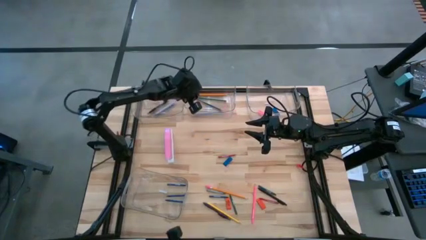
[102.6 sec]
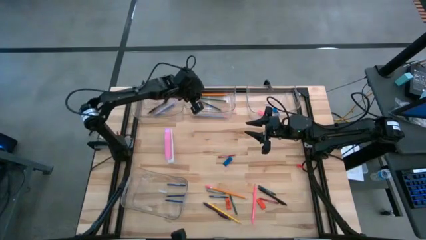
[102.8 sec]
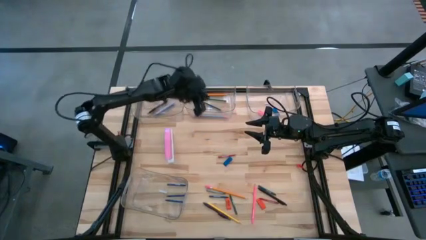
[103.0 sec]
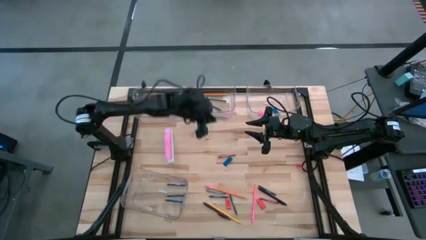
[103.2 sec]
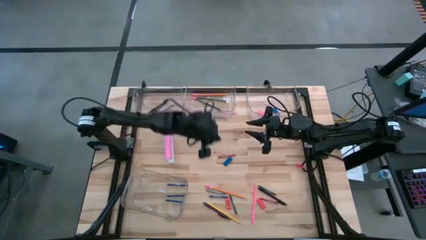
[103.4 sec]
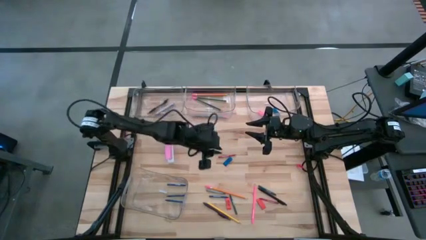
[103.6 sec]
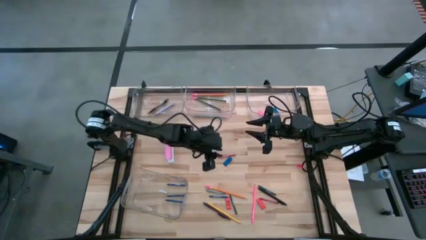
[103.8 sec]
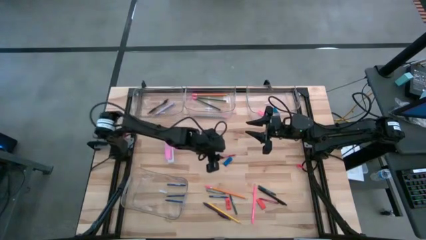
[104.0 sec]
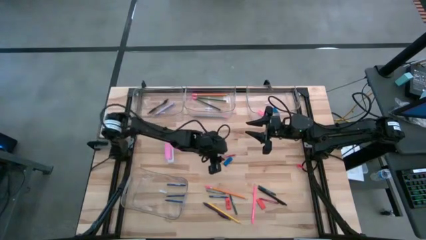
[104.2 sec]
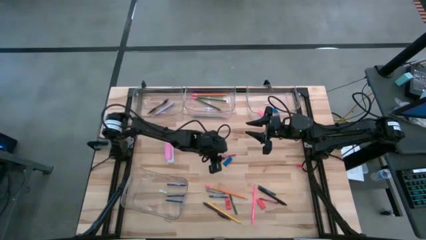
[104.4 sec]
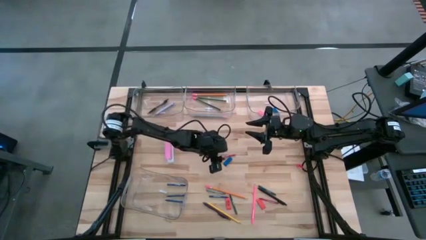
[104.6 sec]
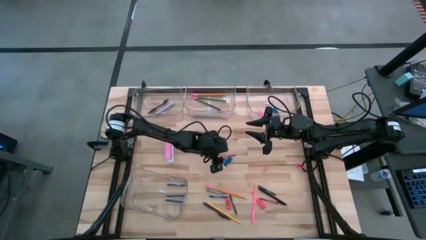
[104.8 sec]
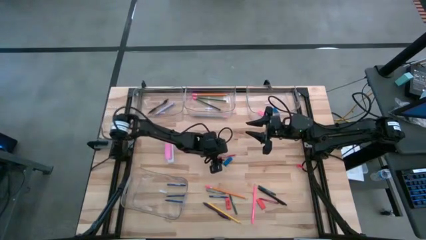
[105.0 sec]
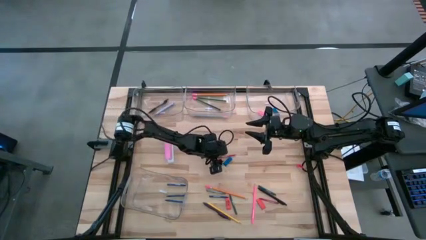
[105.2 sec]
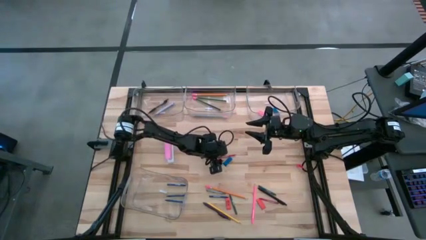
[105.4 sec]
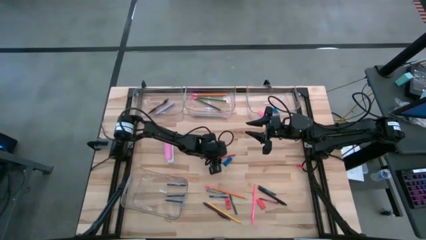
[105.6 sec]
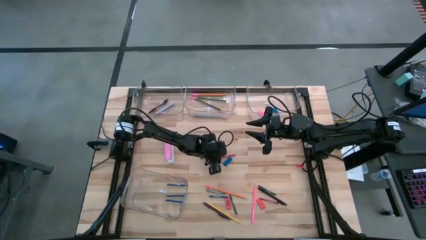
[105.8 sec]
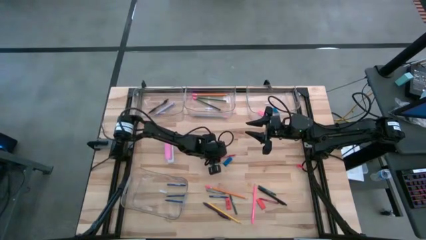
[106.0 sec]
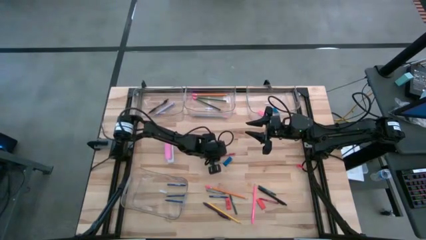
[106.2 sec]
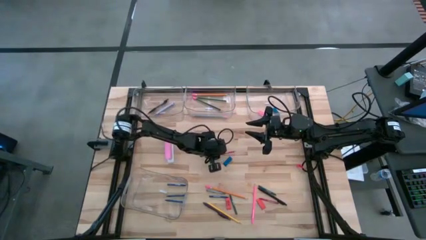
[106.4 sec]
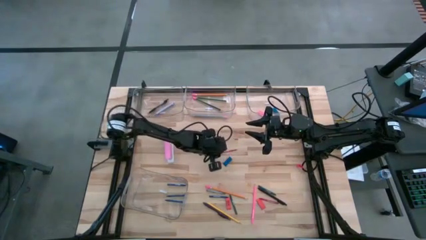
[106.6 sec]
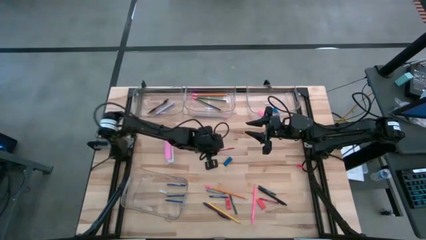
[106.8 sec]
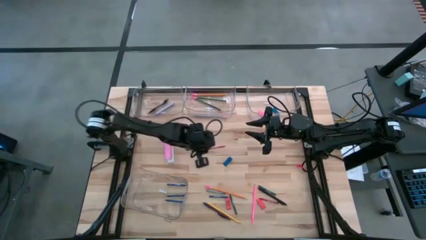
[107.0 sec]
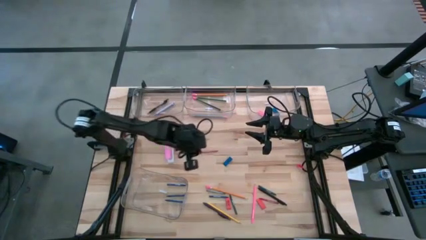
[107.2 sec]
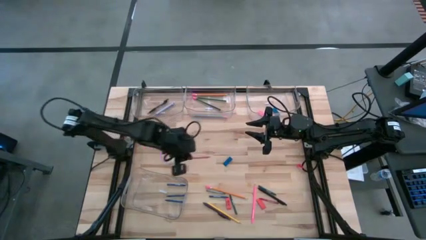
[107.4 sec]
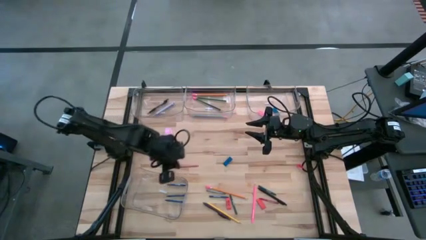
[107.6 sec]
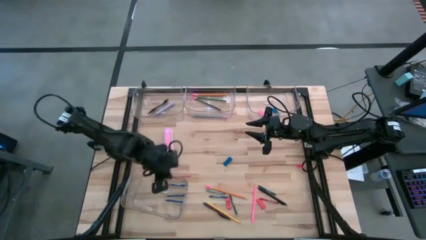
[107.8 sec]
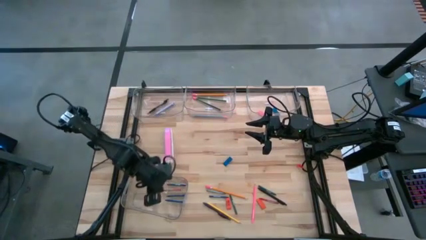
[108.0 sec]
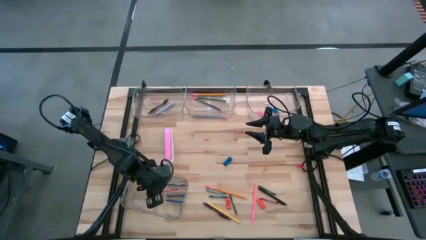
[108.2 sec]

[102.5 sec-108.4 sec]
Task: Sort crayons/erasers/pens/pencils in bins
Put the red crayon into the bottom left transparent bin

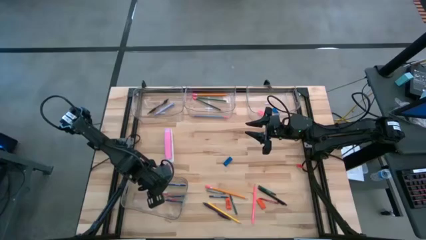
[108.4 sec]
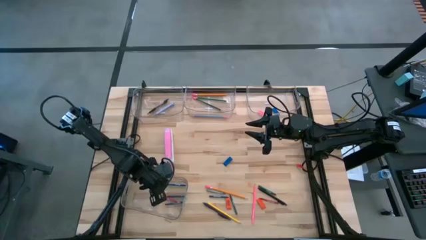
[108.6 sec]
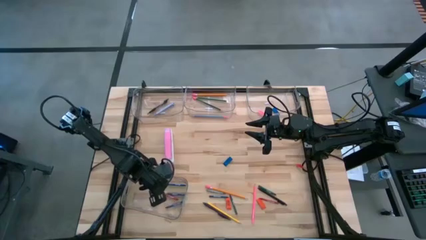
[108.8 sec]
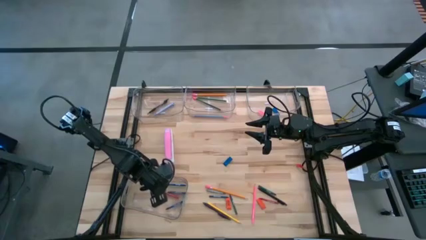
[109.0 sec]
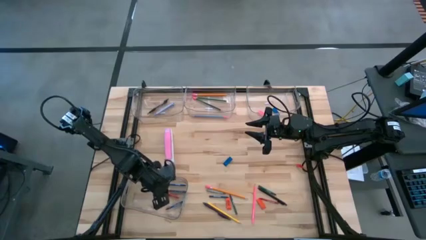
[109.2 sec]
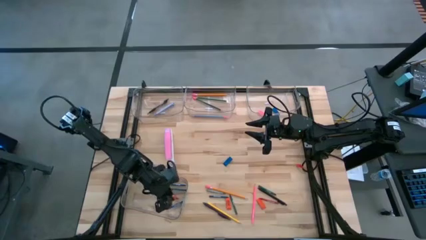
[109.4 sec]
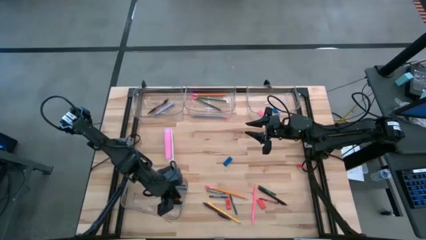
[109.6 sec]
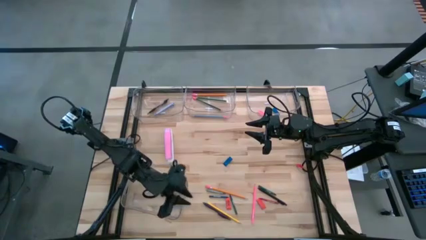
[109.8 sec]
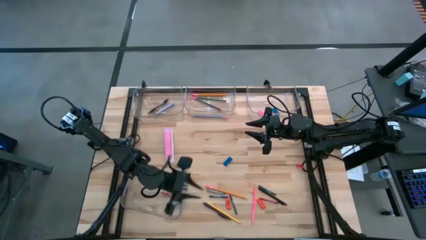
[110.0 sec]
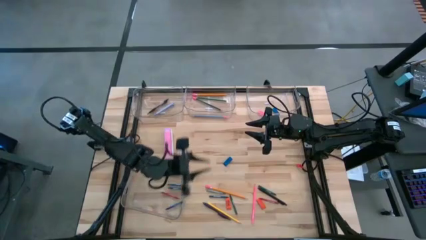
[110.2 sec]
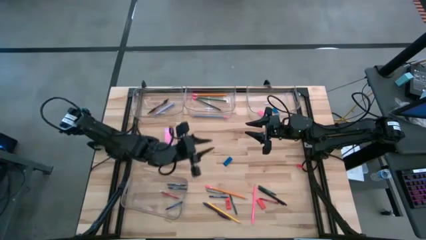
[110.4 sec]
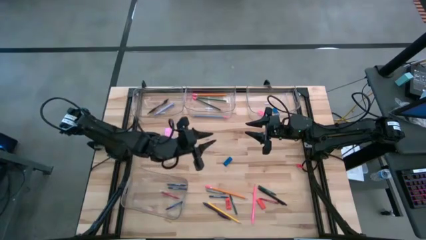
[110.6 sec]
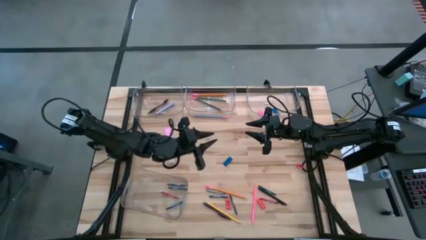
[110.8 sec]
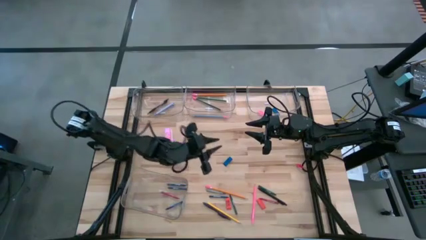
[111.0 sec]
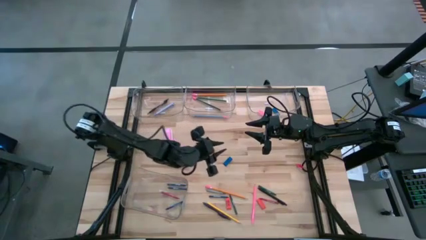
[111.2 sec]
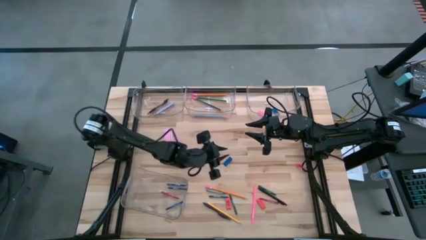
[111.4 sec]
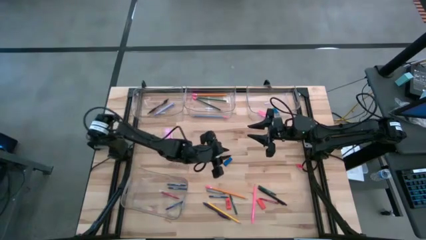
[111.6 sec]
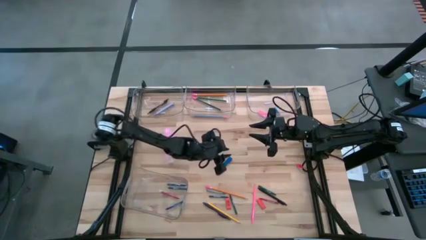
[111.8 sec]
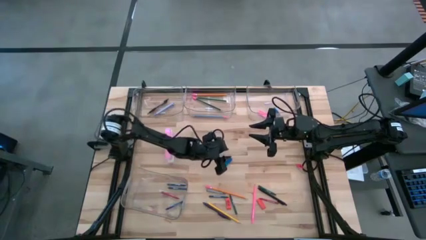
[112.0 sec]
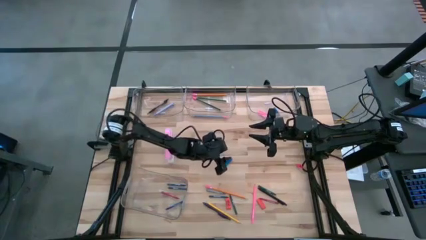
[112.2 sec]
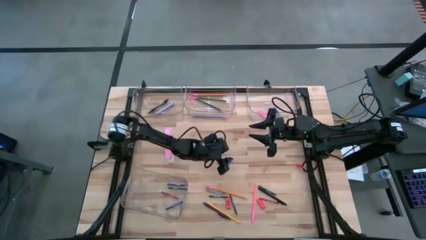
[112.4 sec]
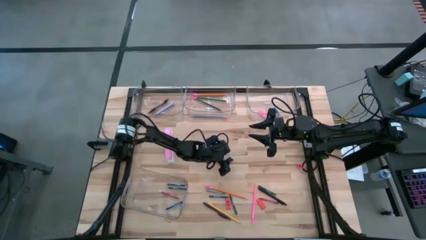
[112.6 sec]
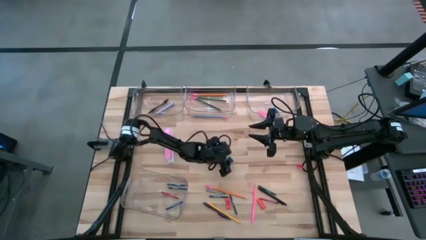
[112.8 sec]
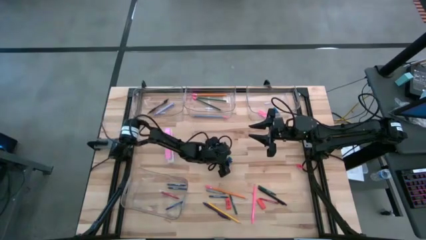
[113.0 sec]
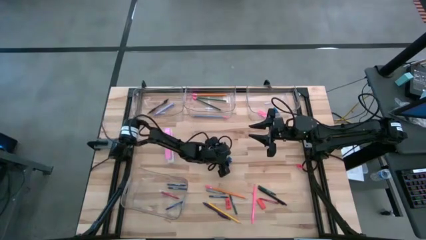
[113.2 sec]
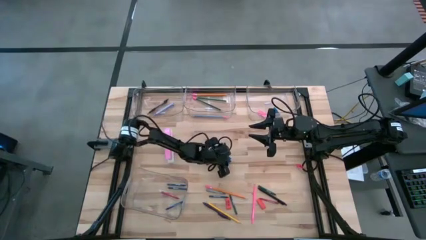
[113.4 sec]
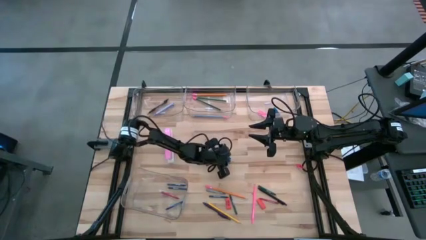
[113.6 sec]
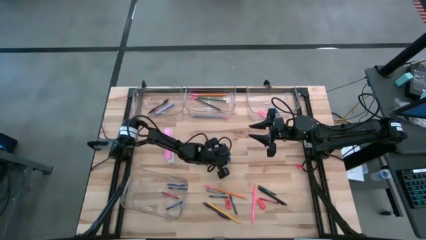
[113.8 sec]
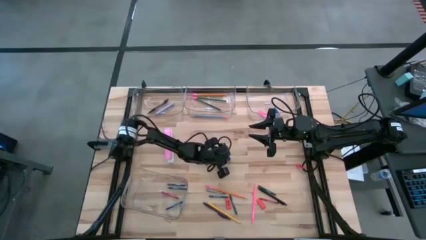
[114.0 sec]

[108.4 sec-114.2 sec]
Put the blue eraser into the top right transparent bin

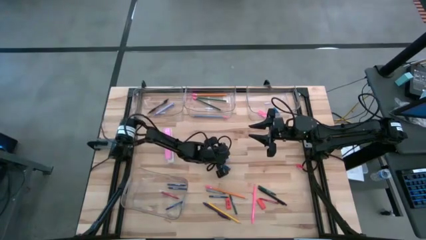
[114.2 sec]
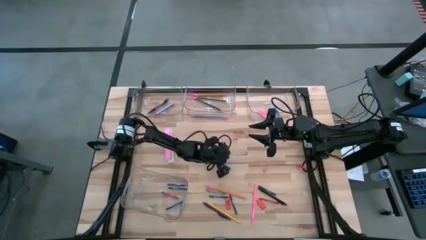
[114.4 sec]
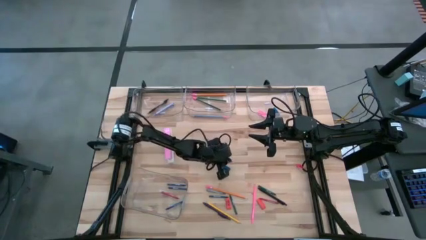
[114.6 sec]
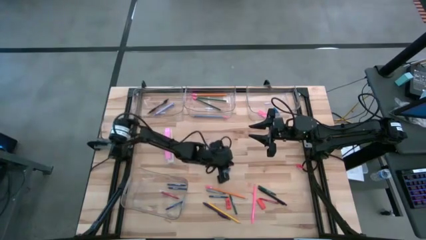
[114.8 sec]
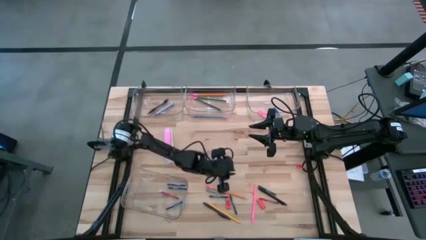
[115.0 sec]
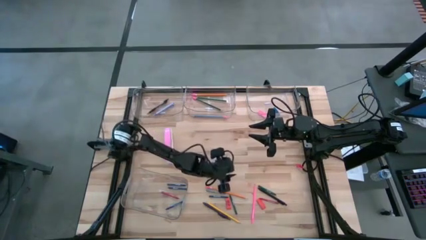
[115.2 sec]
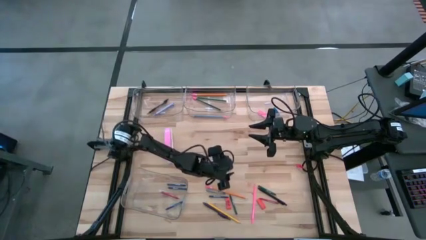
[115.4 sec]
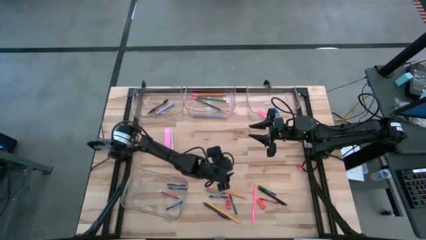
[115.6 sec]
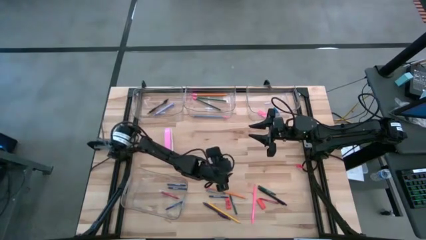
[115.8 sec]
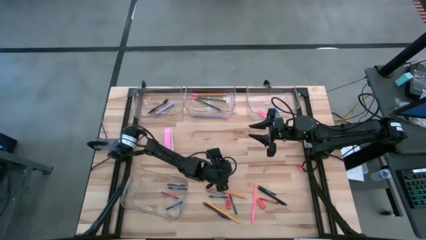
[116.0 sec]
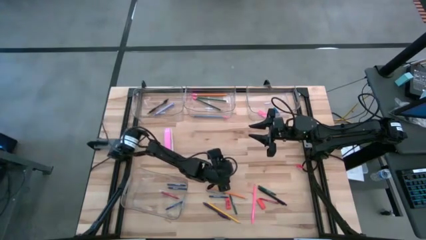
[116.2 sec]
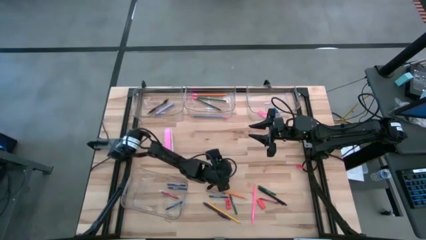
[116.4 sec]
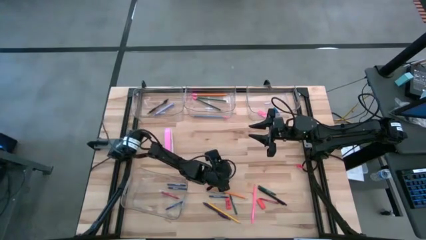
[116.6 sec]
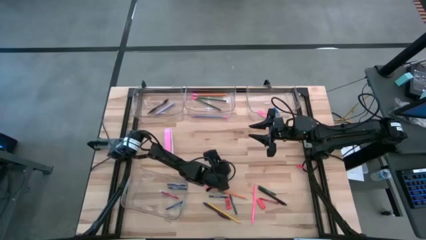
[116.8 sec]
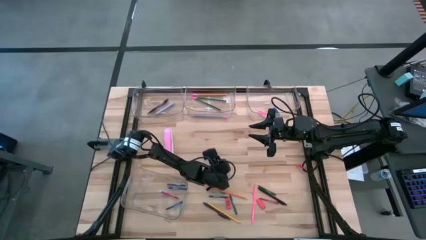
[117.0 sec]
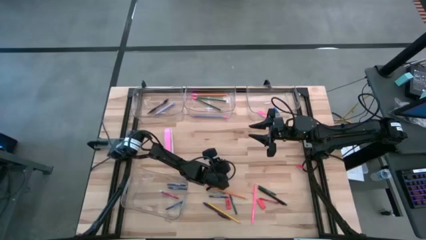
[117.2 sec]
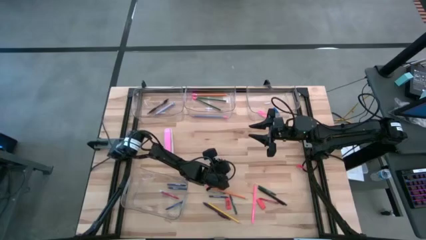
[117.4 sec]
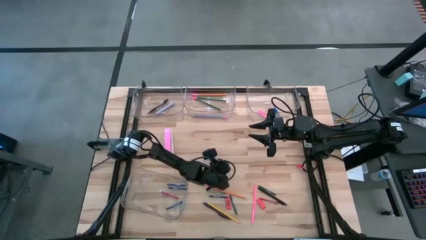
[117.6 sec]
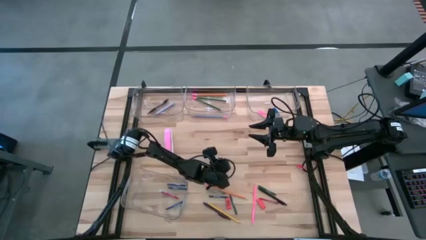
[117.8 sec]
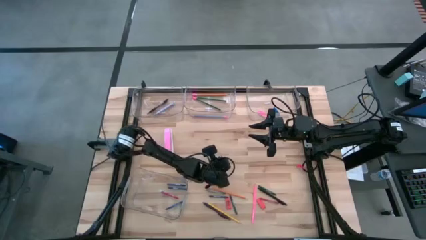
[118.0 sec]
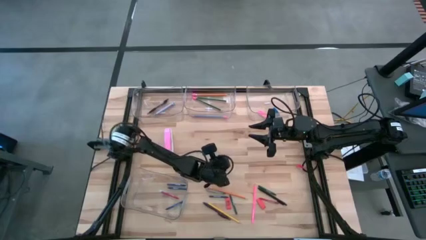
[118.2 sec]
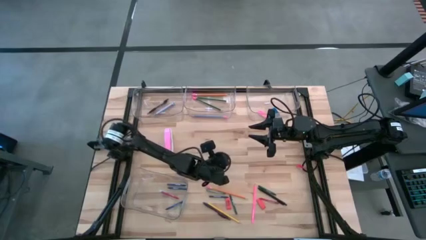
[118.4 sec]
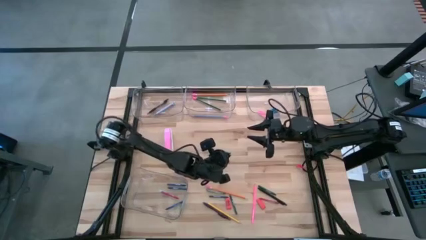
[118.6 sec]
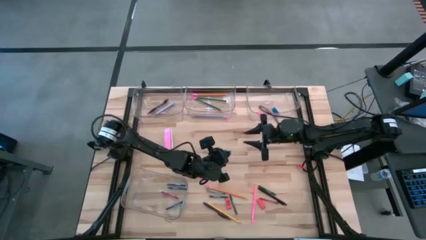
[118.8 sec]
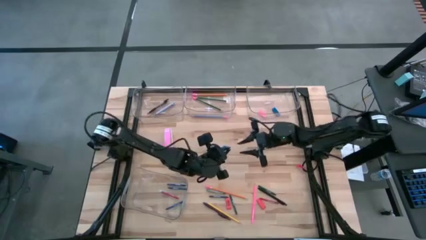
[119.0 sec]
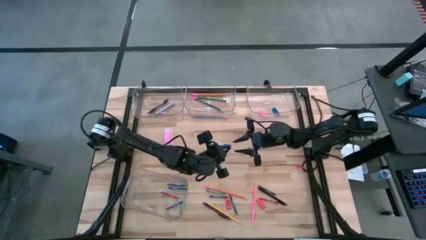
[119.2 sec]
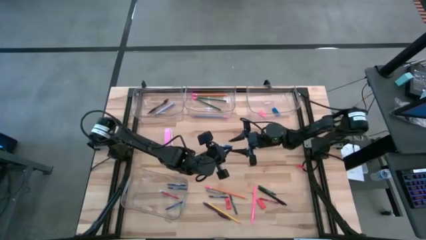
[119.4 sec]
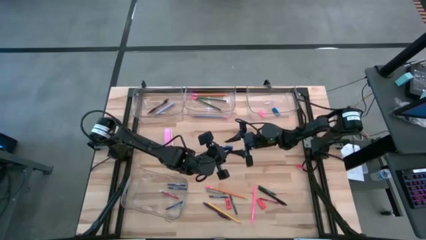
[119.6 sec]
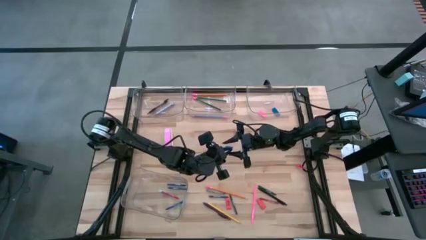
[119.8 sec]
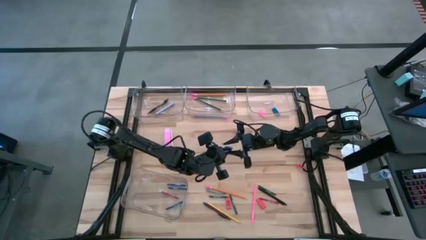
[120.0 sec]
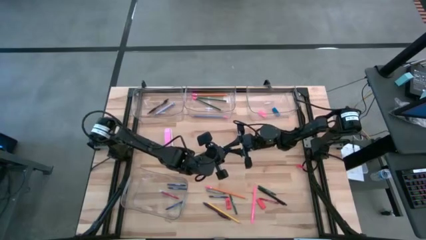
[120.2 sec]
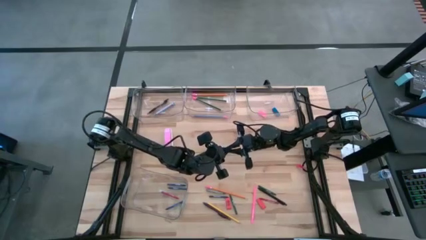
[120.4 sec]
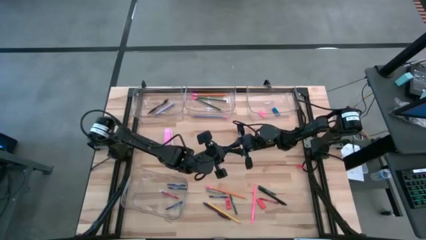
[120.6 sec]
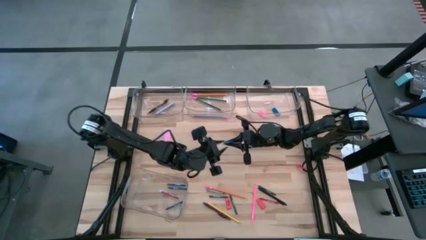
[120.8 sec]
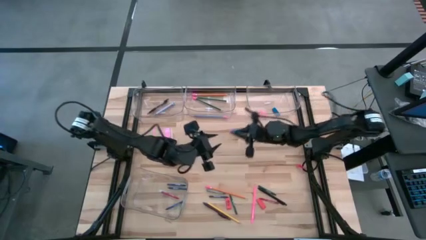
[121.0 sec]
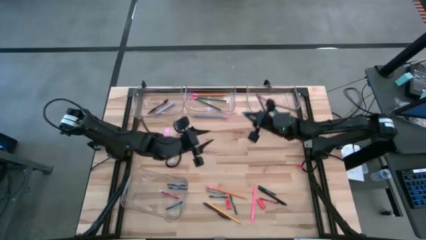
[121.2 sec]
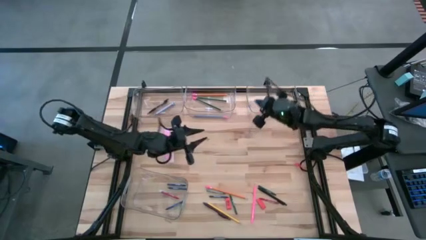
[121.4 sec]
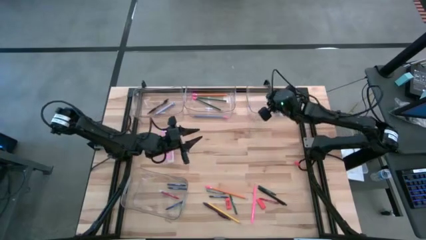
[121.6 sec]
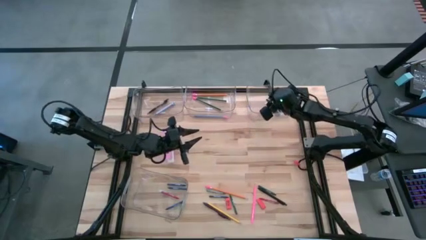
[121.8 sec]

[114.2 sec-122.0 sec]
Put the blue eraser into the top right transparent bin
